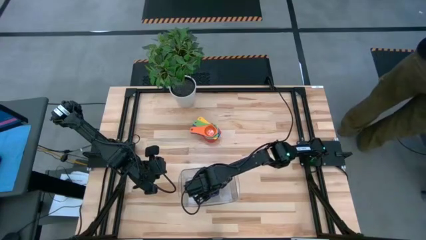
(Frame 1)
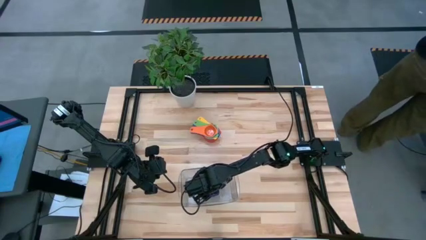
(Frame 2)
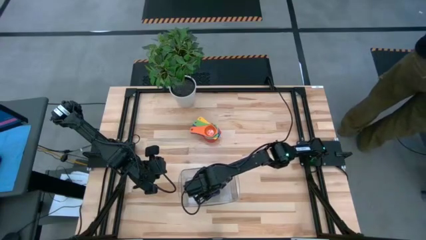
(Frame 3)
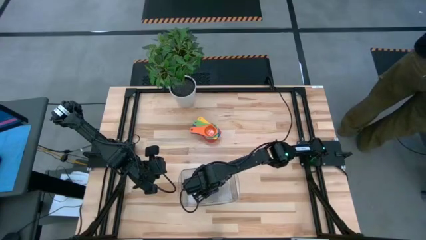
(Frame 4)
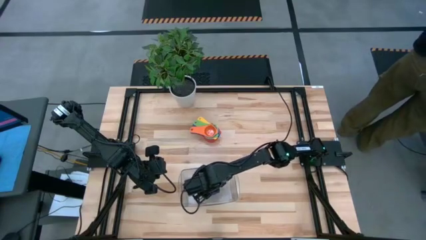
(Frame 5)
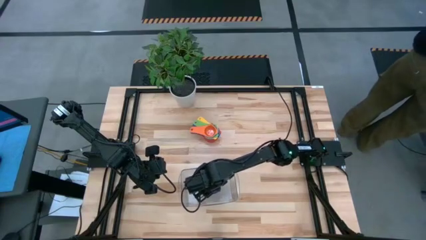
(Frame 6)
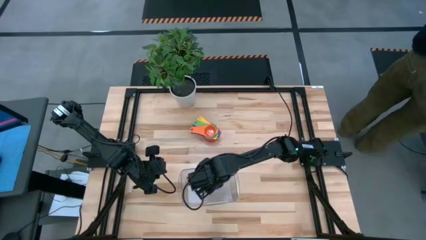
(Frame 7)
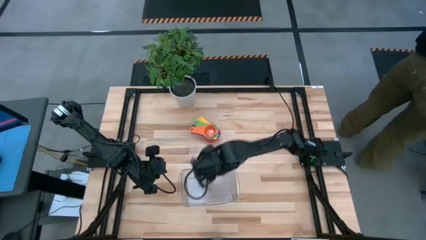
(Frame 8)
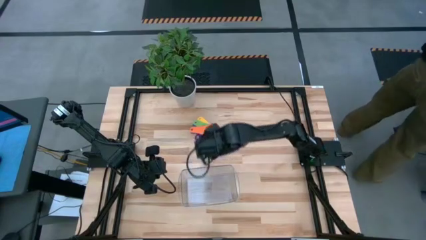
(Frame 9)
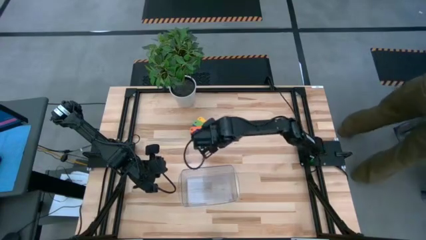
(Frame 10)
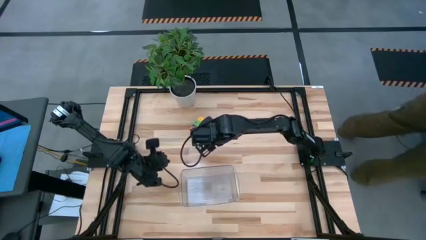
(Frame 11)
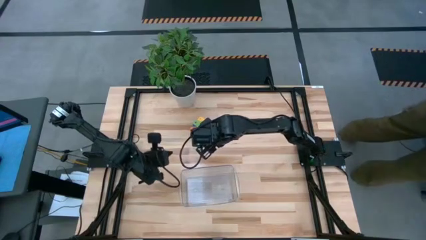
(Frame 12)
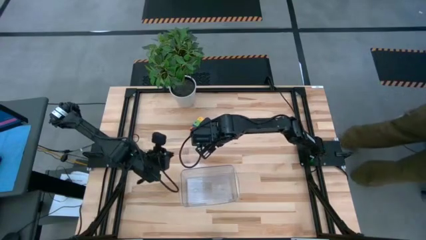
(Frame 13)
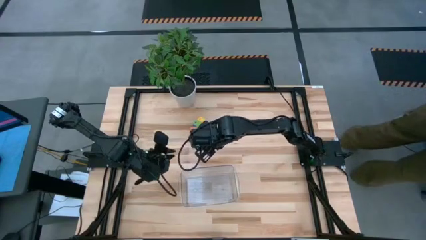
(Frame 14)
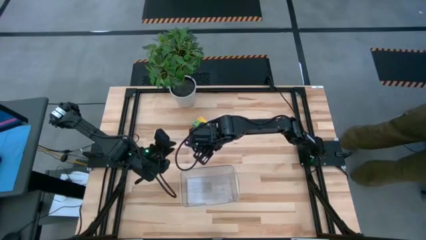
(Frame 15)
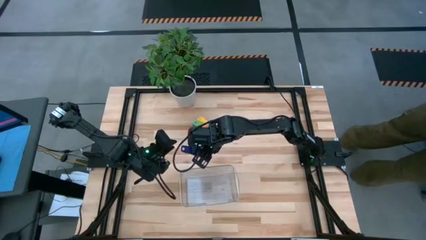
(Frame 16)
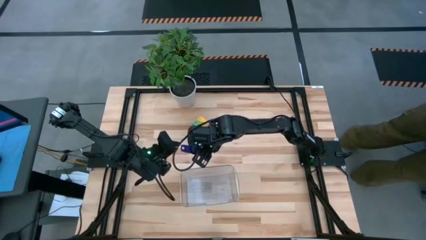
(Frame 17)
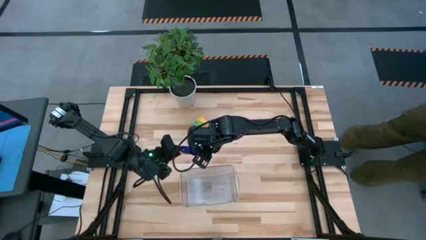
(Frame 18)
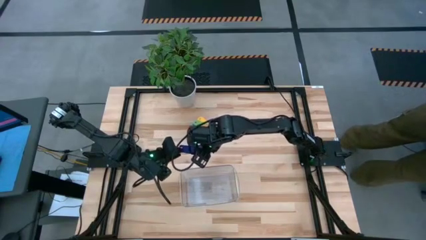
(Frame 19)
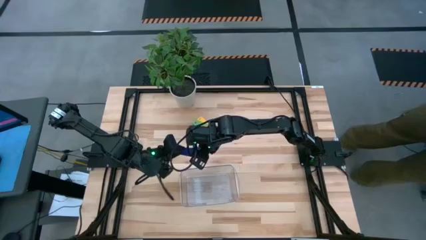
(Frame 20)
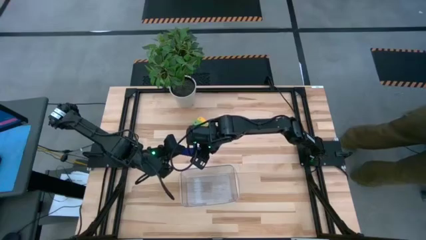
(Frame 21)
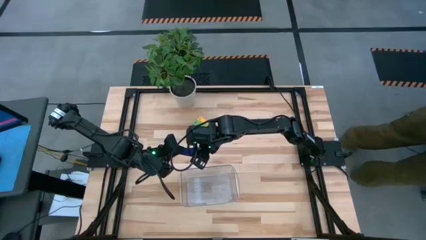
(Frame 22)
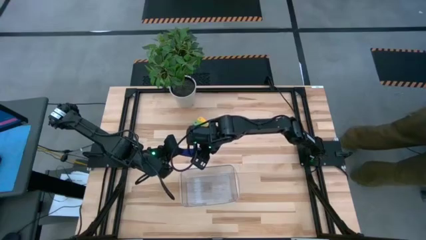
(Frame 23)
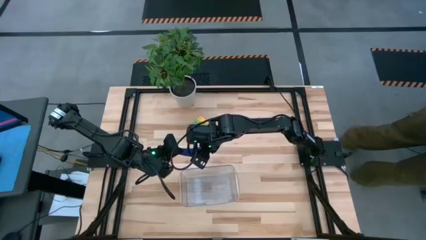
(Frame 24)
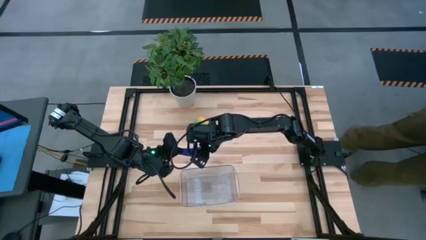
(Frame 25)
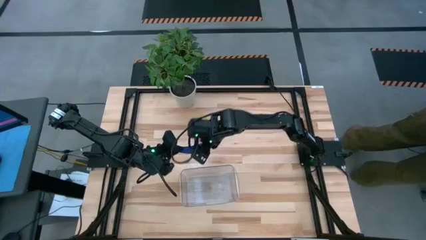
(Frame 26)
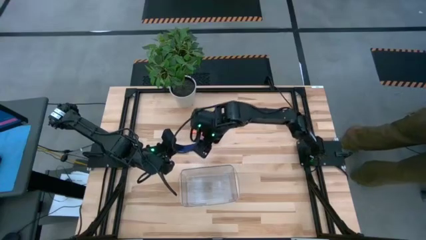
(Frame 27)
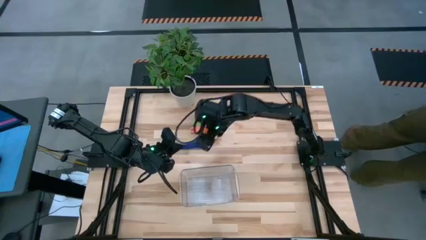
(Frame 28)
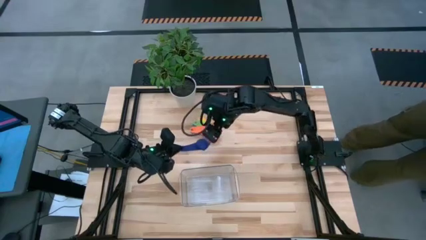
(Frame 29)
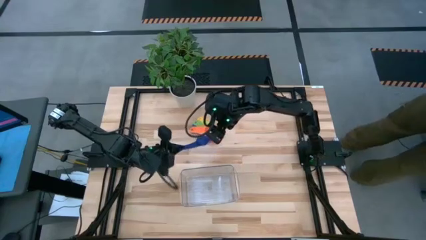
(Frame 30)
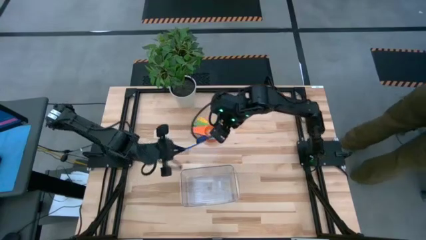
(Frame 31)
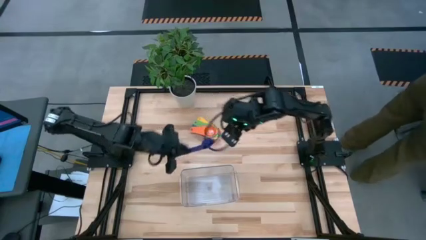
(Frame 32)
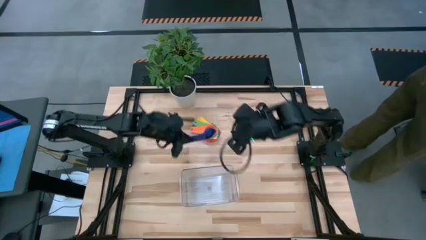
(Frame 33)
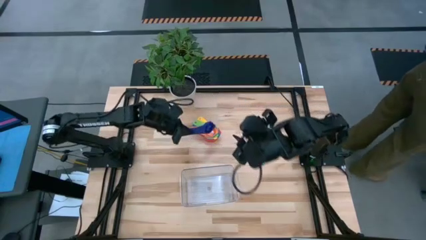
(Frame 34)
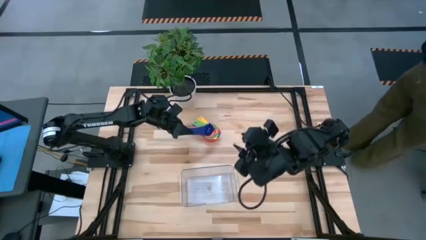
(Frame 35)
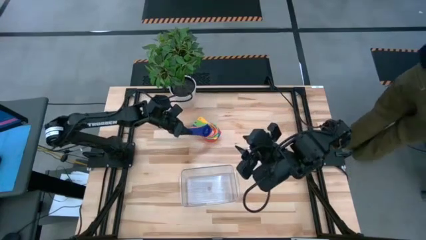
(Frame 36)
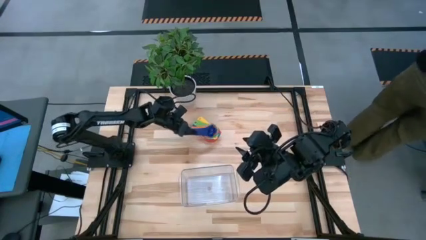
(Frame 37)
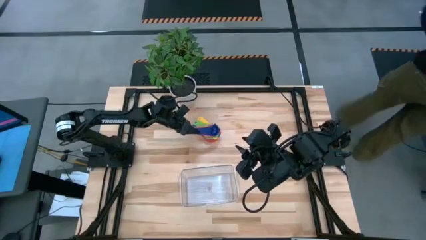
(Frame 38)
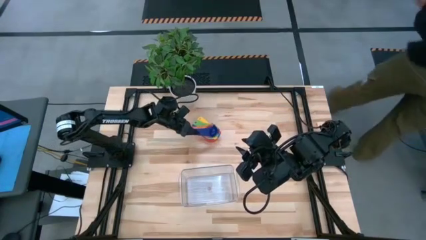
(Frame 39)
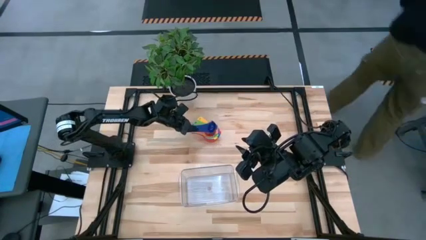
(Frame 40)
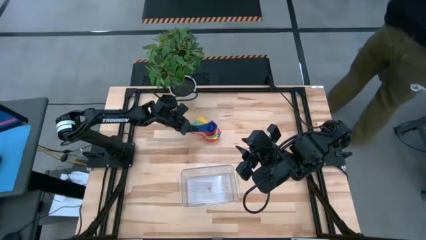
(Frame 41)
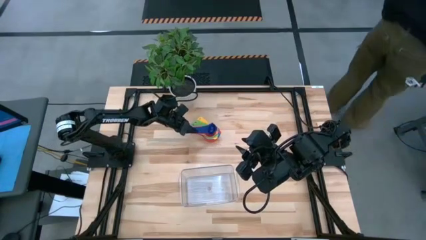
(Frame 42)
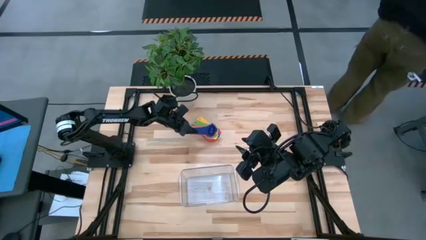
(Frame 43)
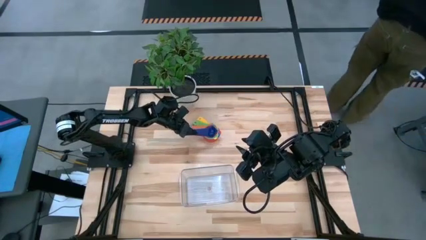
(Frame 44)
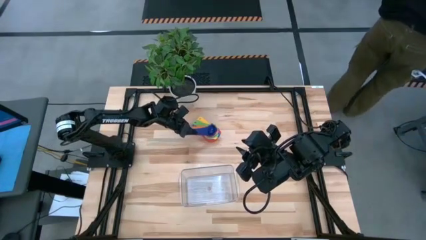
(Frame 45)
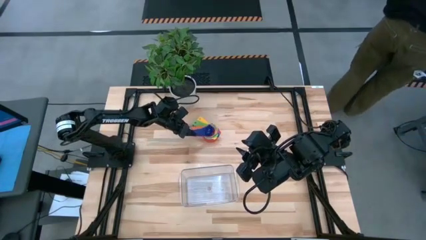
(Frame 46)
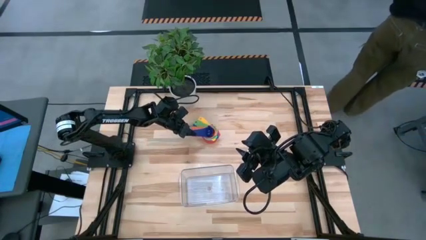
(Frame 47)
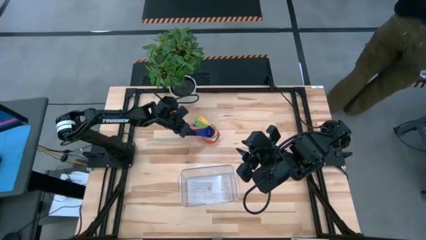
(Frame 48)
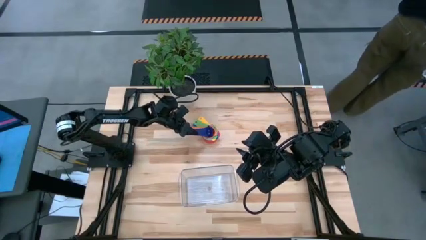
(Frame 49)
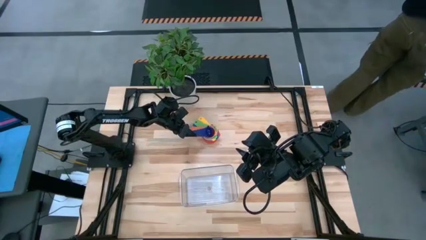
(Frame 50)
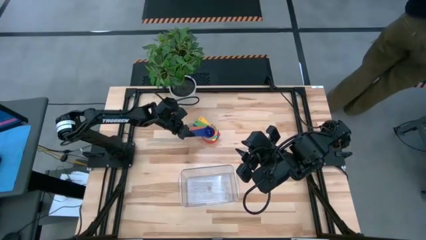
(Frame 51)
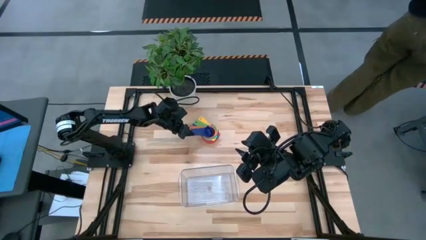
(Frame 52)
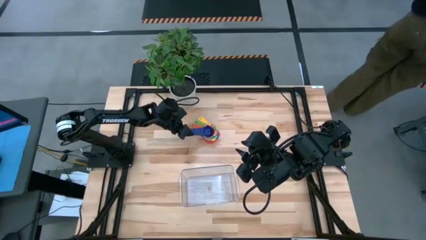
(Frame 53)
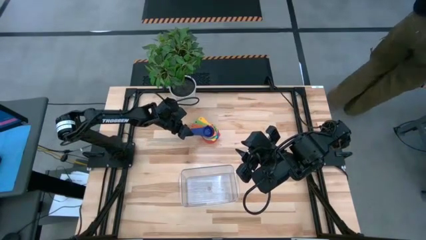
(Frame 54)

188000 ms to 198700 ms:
Task: Nest measuring cups in basket
Stack the dark blue measuring cups on top of the orange measuring cups

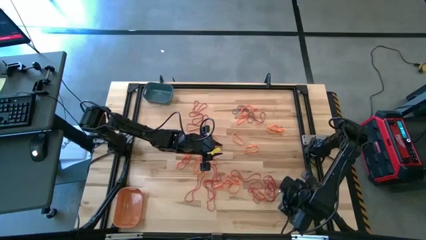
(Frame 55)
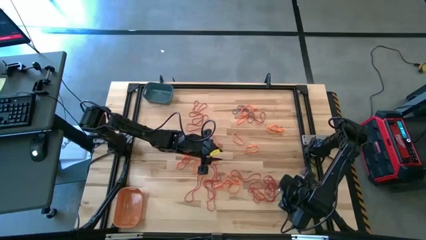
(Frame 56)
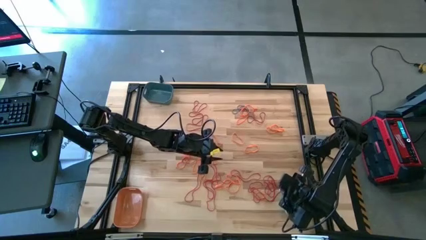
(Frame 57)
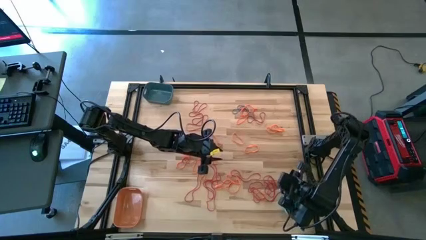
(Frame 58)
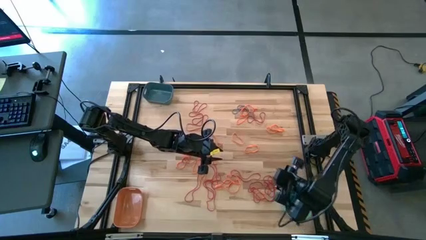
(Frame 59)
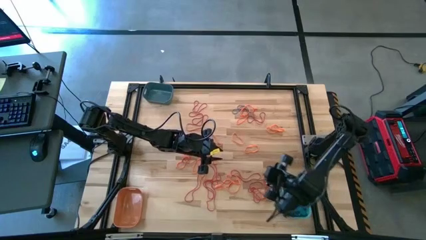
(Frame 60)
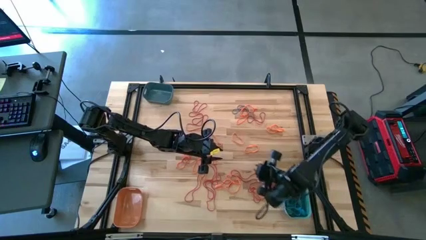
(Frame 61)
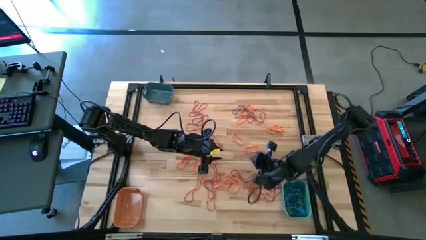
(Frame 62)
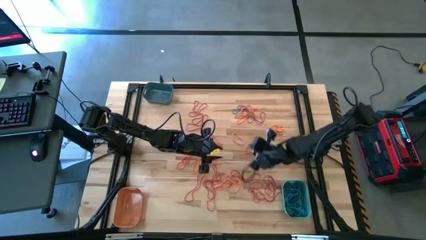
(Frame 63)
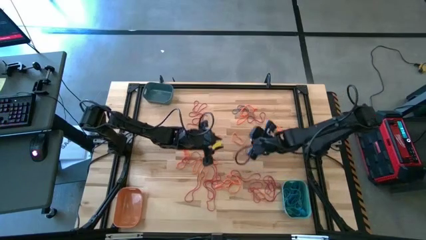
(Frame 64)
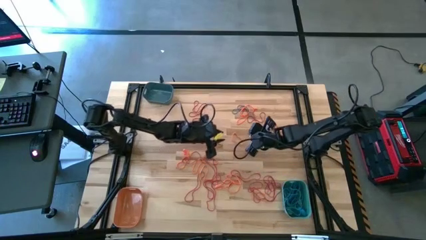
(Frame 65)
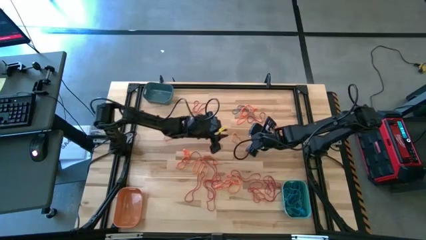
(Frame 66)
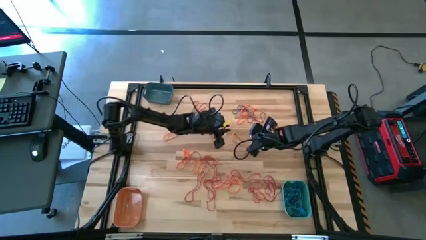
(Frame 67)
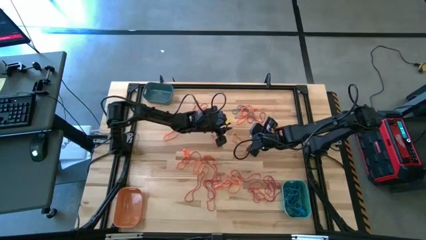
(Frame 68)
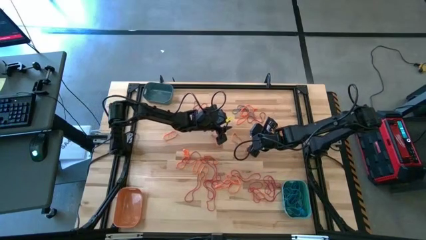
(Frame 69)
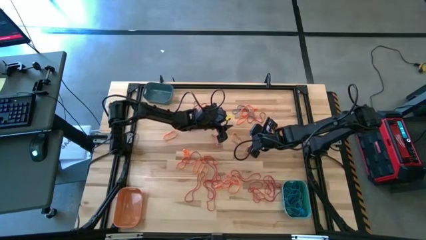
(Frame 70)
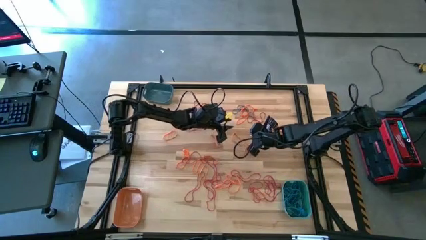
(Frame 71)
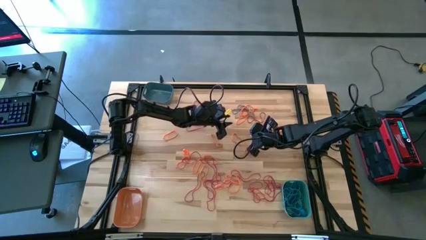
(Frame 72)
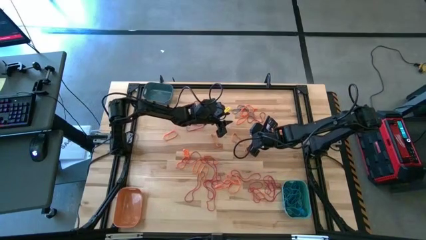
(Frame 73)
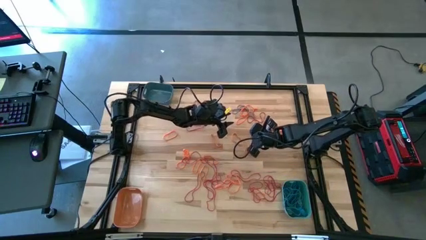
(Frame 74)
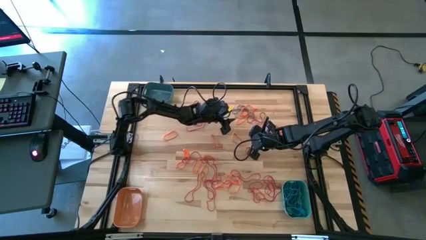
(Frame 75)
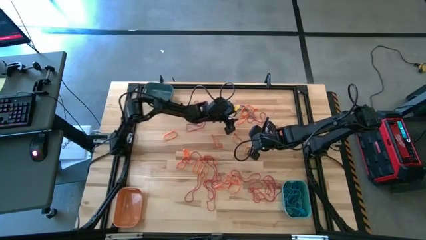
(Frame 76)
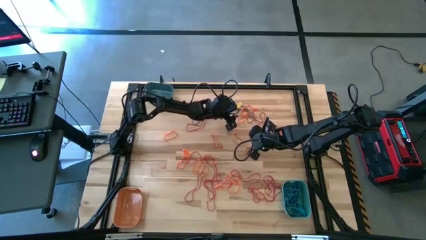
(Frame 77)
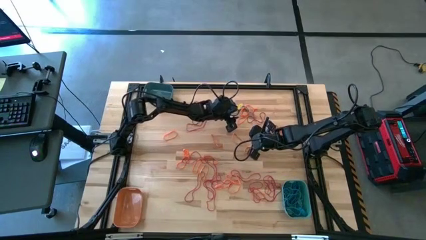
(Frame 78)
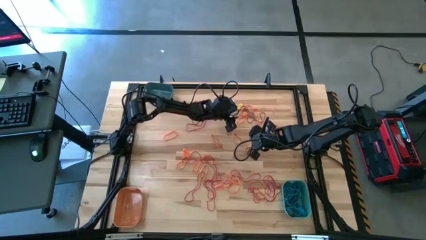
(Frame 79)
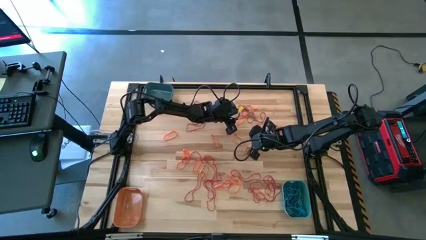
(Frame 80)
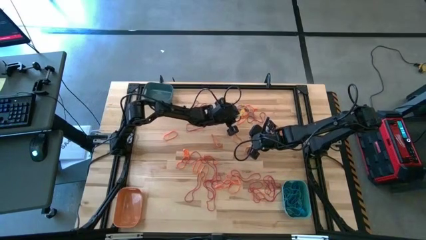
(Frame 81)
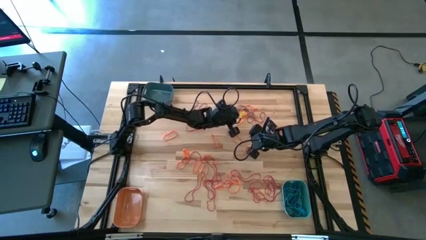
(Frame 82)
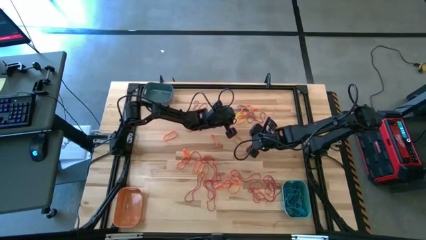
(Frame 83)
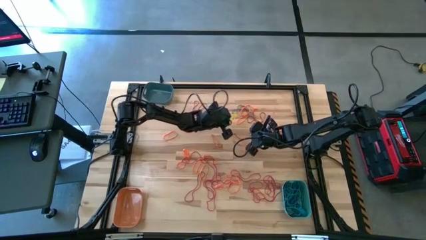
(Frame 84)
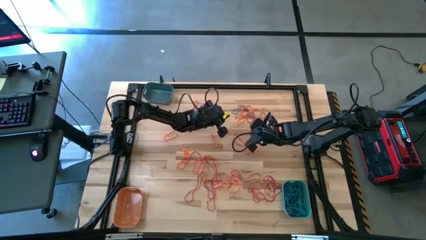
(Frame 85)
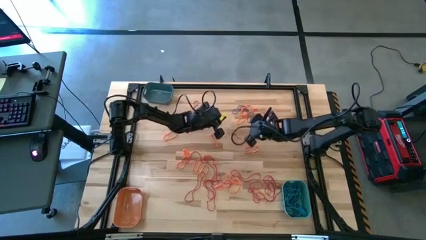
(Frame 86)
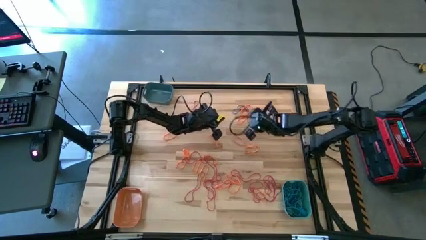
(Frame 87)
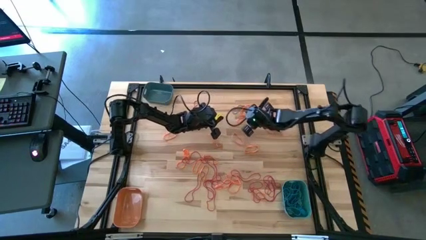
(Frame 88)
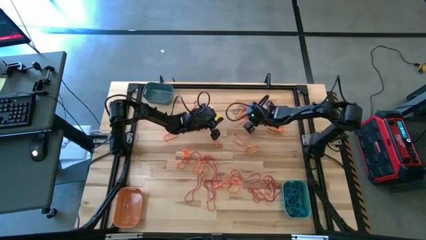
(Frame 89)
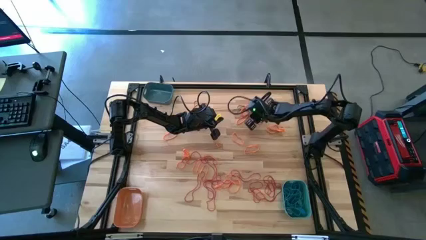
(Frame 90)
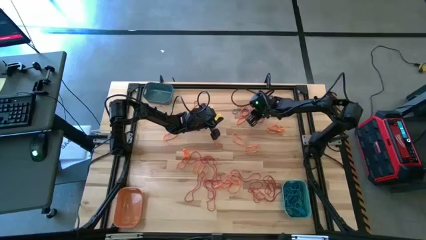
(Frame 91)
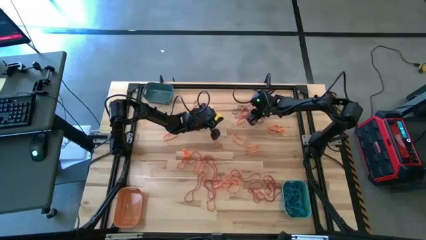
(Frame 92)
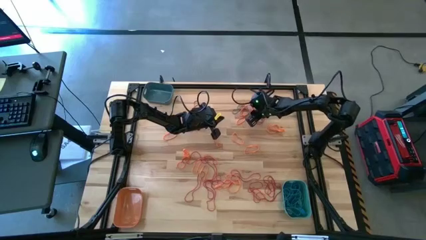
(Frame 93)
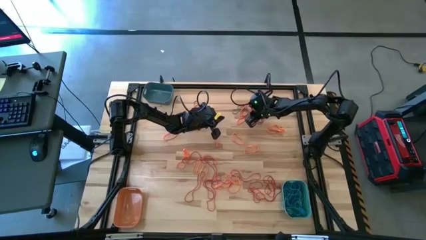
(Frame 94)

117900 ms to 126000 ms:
Task: Sort rubber bands into baskets
Put the blue rubber band into the light blue bin
